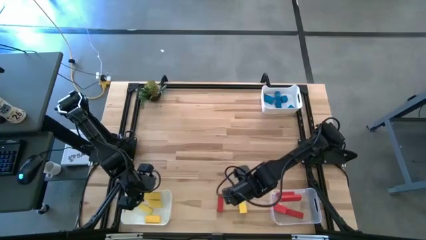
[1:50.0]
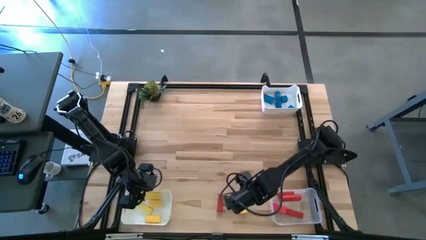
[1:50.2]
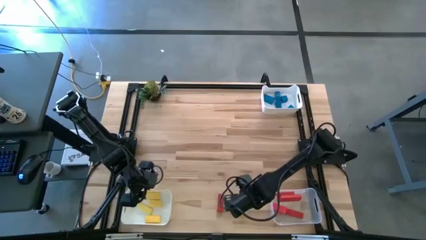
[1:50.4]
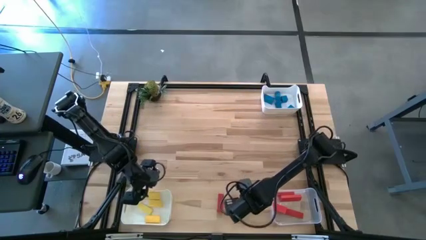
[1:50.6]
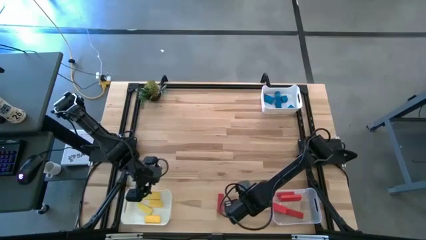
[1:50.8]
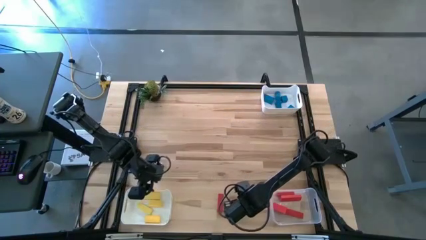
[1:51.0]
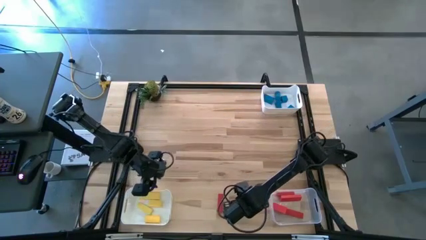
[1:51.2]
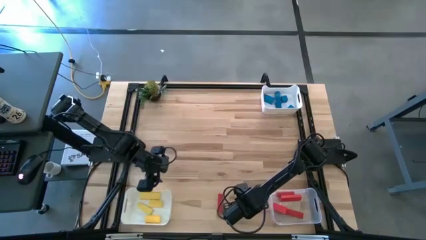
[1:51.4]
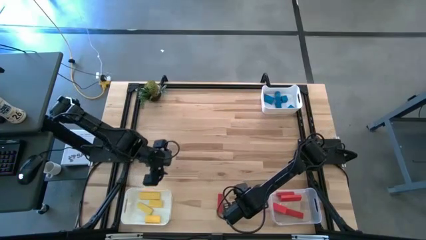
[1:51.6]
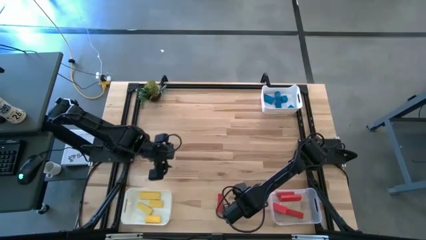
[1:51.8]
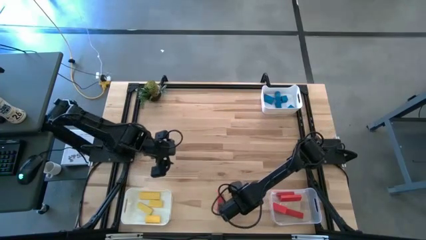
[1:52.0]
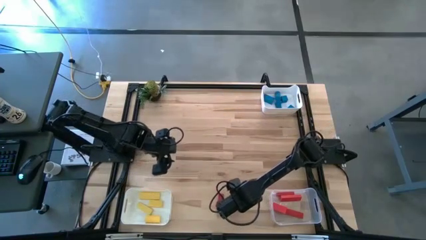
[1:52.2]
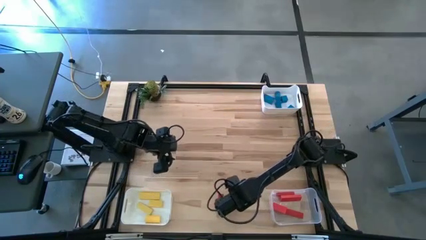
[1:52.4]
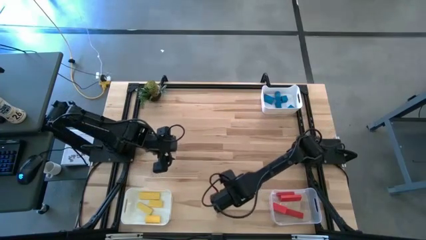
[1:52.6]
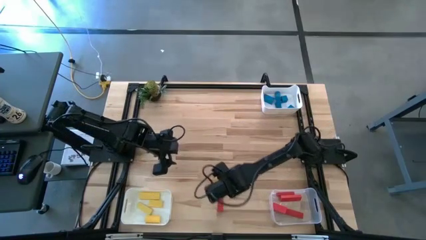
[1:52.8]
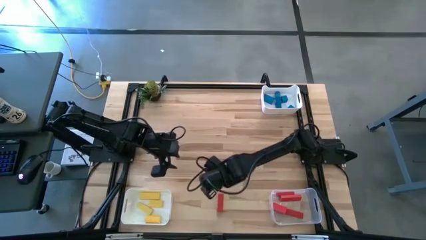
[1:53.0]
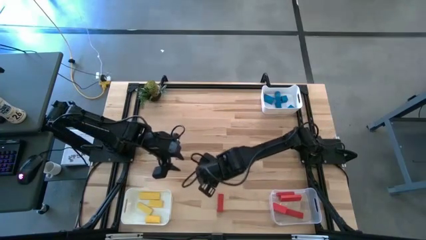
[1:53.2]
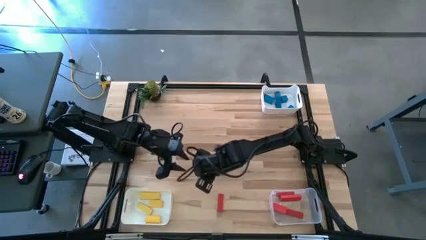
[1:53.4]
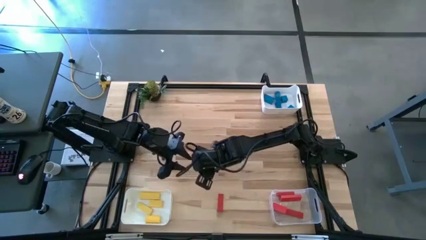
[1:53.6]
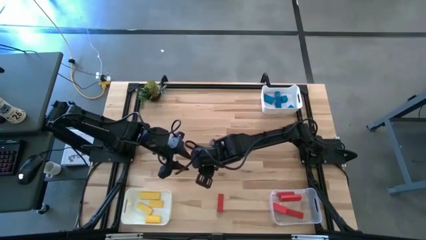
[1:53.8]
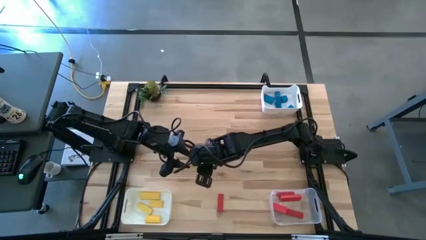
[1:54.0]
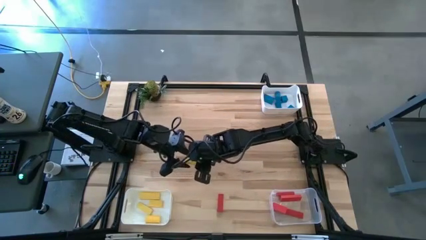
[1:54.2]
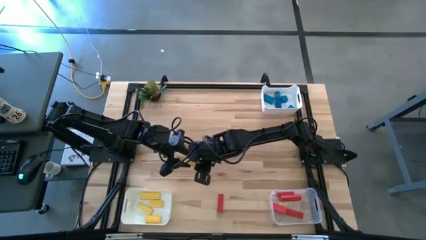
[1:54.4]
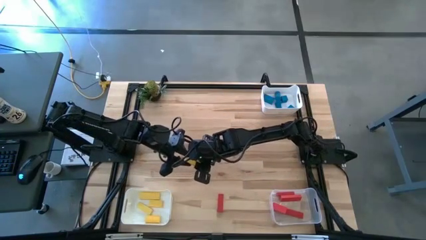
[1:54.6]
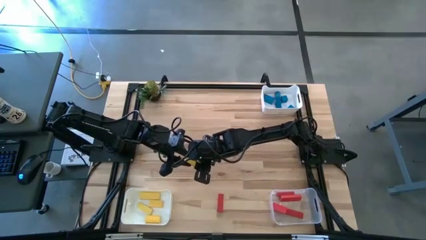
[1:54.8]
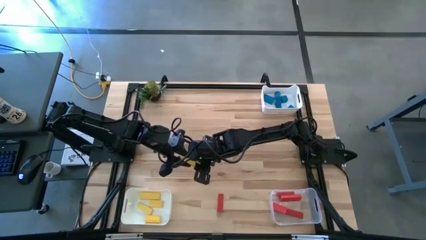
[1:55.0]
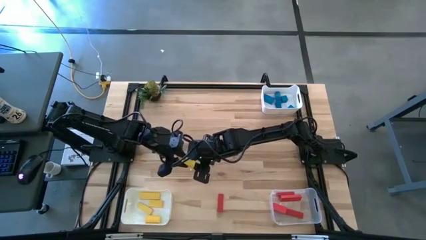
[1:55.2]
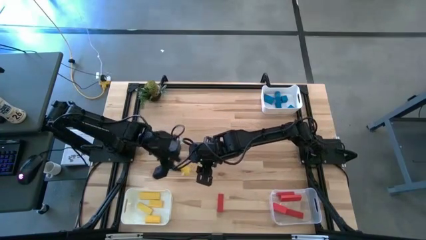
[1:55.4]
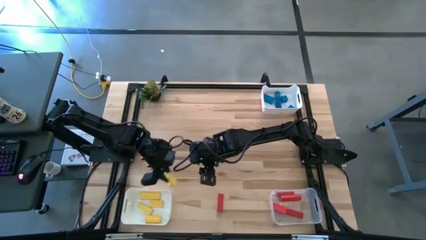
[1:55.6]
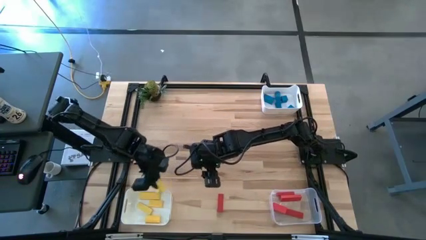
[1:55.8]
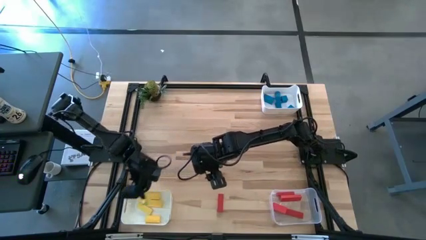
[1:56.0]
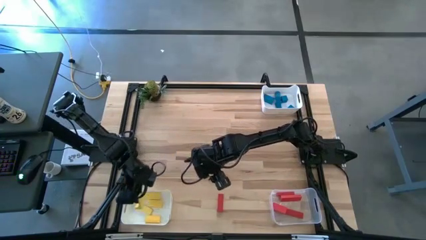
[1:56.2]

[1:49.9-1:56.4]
Task: Sort & place blocks by color
Put the yellow block into the bottom white bin

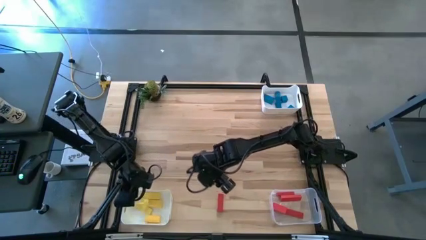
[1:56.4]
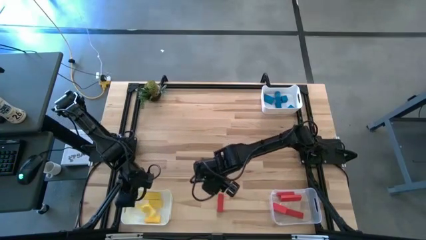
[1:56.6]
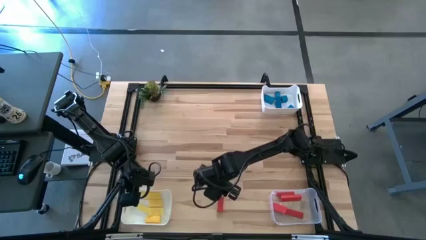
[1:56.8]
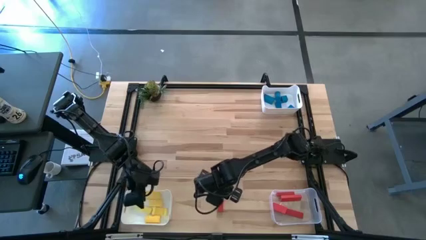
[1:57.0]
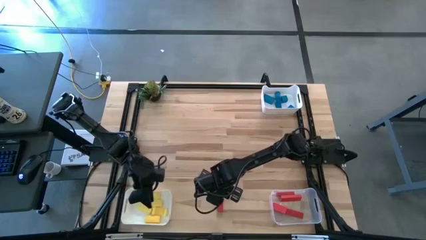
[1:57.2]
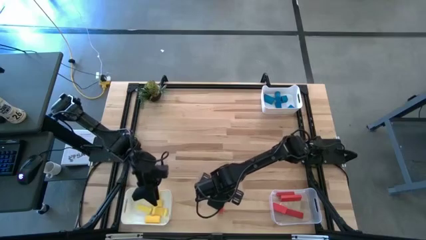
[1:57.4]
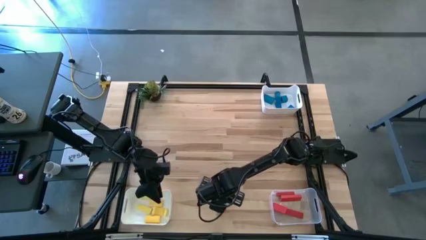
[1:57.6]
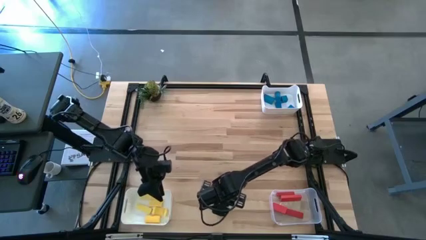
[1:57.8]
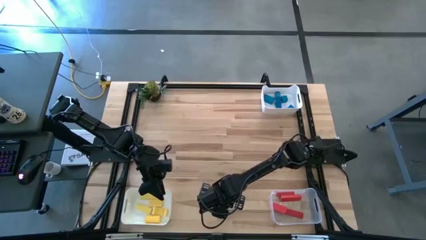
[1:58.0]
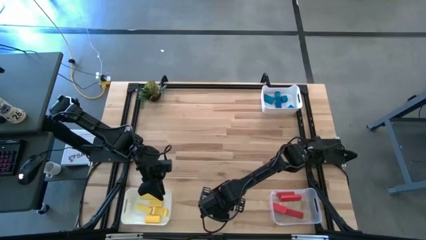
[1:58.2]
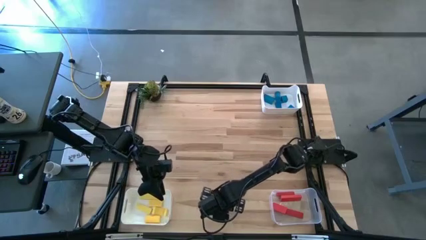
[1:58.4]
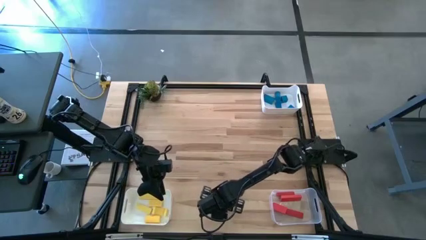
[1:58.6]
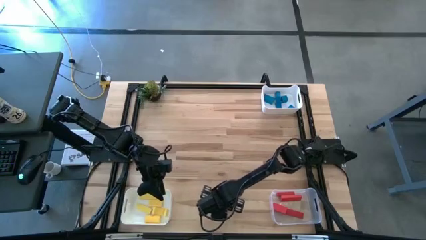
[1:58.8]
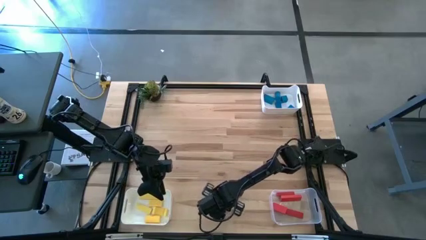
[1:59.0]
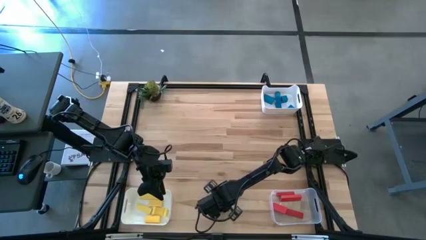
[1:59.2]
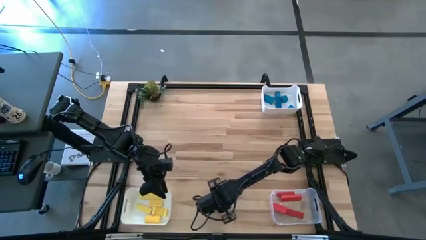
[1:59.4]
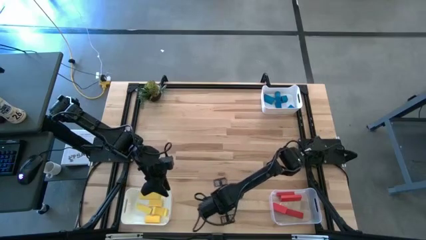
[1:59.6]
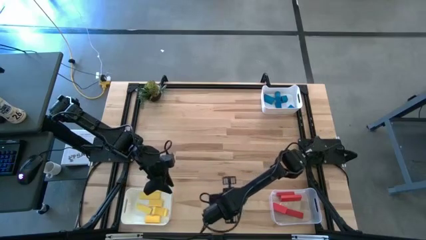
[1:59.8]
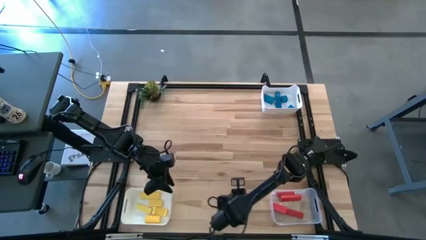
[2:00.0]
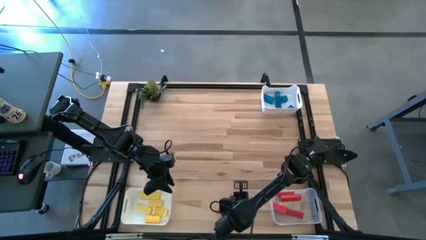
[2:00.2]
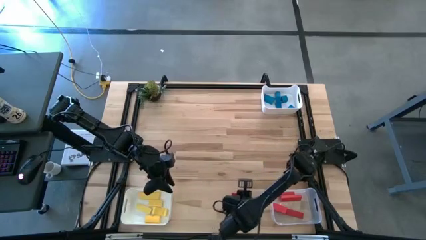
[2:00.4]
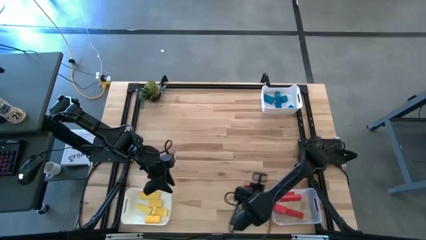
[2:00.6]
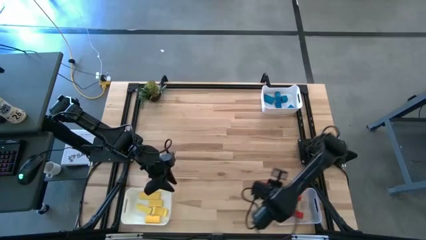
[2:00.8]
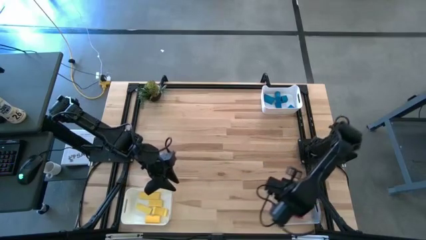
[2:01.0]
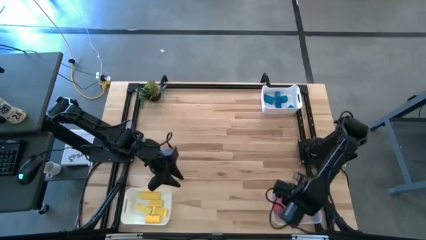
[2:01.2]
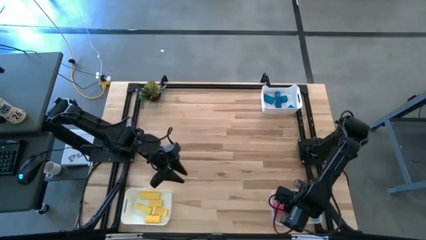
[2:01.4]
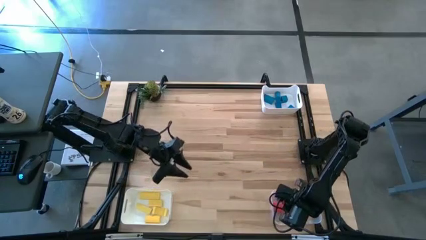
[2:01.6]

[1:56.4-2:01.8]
Put the red block into the transparent bin

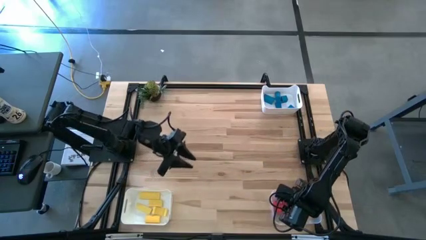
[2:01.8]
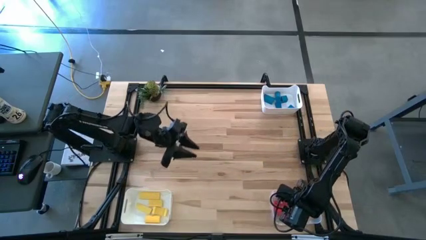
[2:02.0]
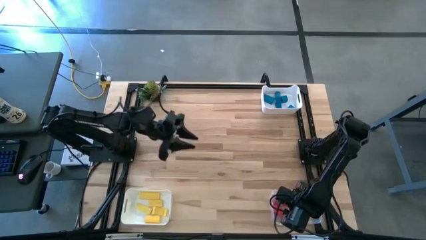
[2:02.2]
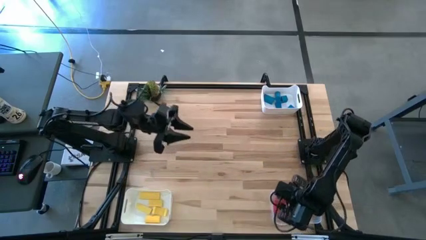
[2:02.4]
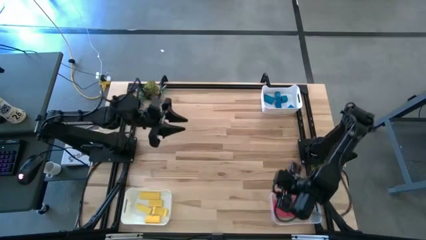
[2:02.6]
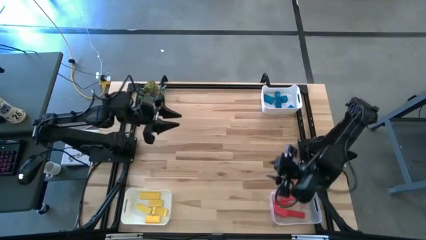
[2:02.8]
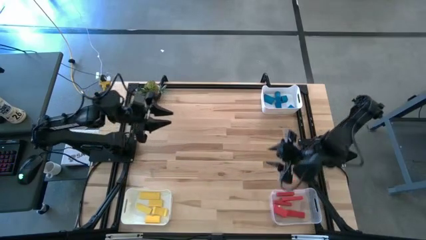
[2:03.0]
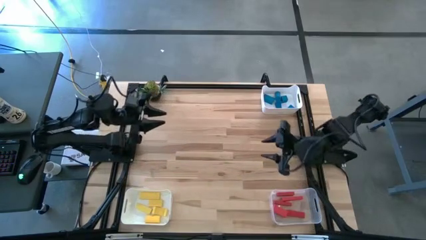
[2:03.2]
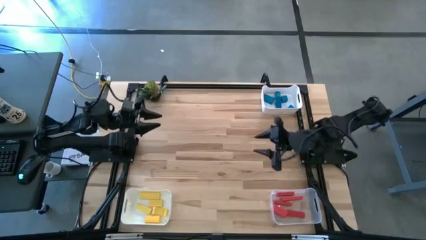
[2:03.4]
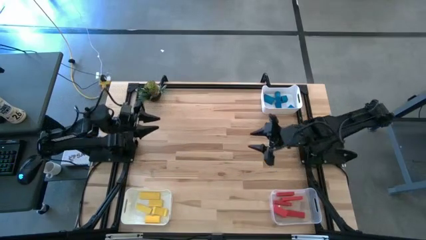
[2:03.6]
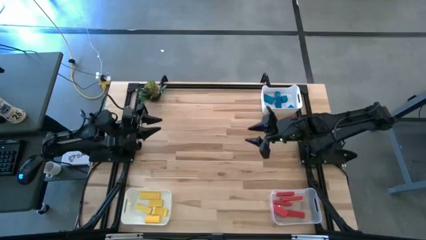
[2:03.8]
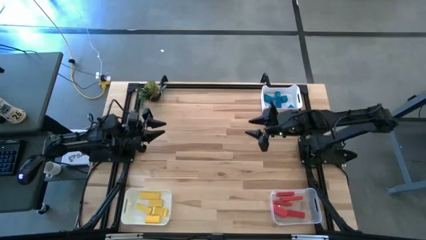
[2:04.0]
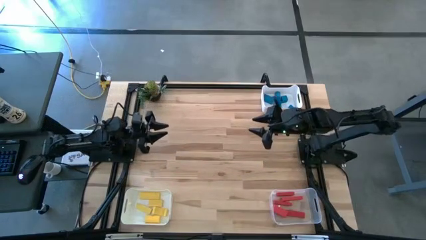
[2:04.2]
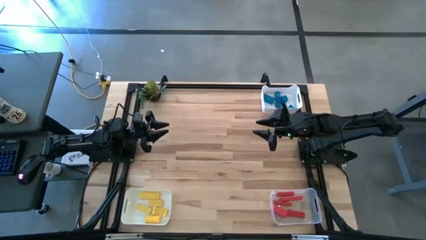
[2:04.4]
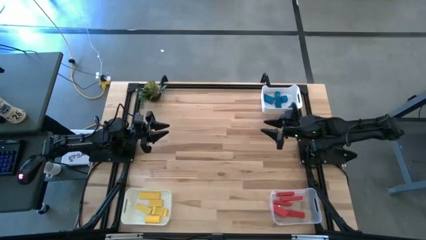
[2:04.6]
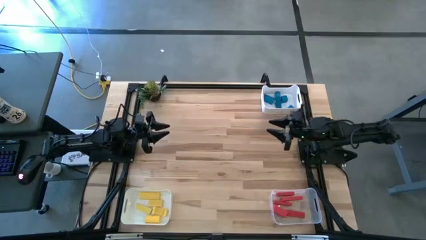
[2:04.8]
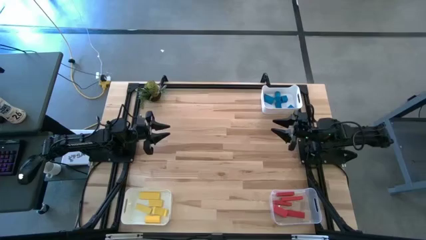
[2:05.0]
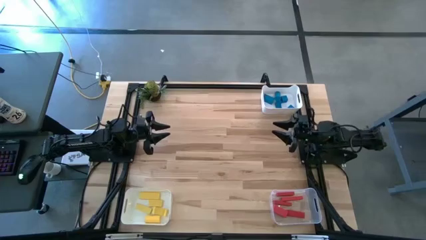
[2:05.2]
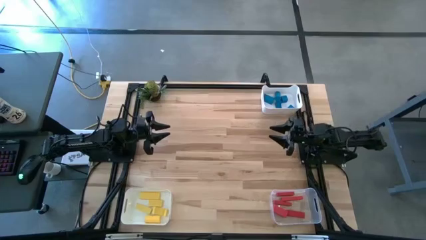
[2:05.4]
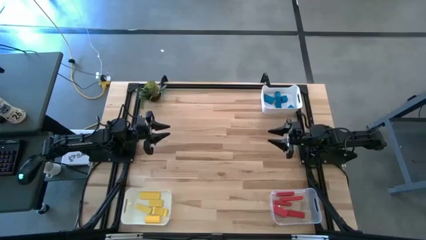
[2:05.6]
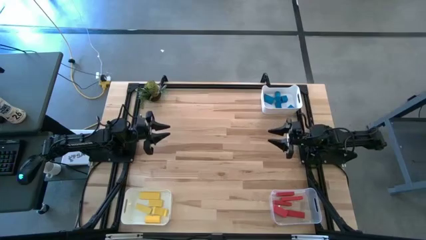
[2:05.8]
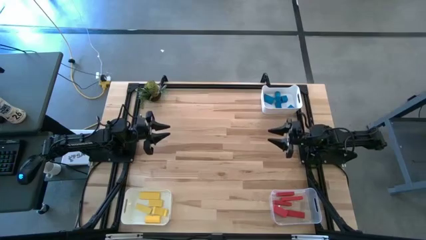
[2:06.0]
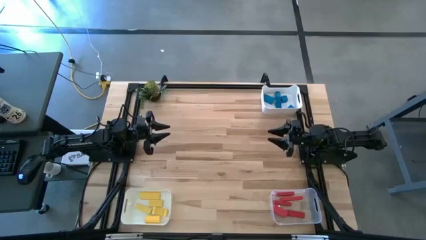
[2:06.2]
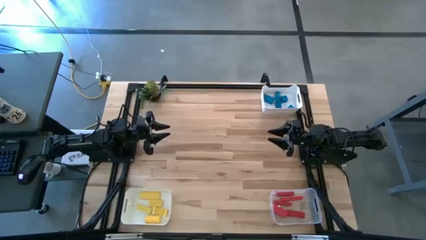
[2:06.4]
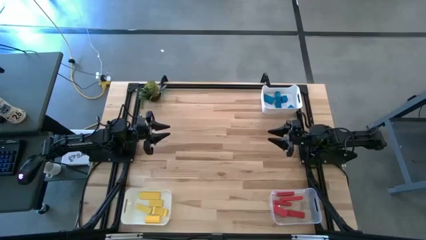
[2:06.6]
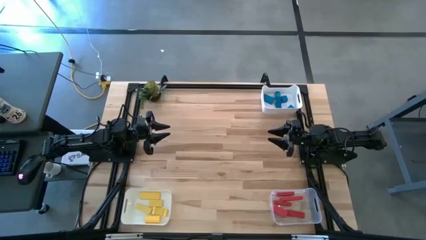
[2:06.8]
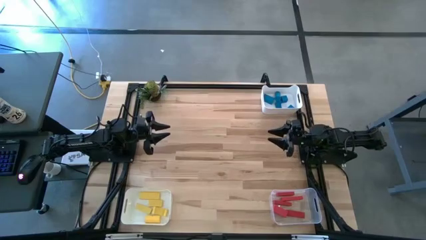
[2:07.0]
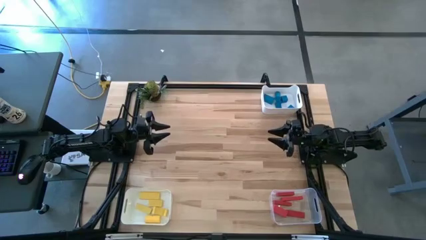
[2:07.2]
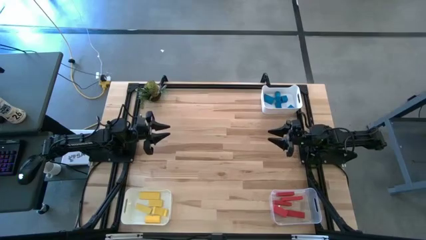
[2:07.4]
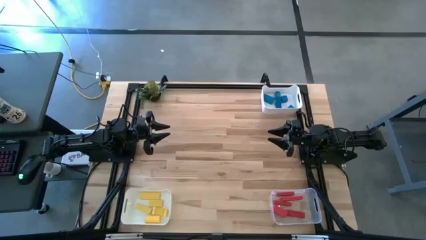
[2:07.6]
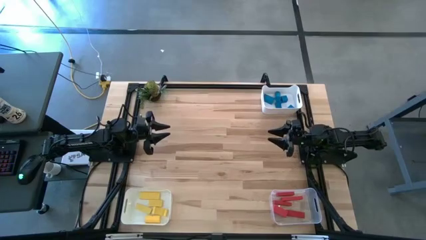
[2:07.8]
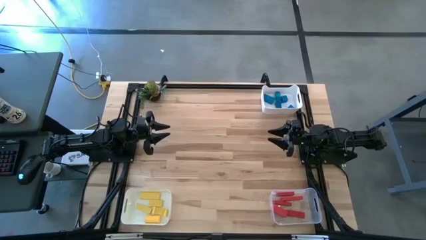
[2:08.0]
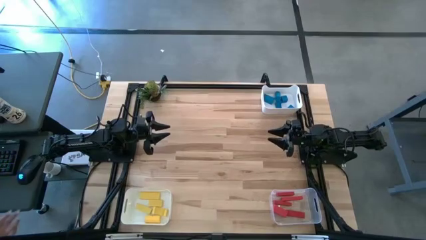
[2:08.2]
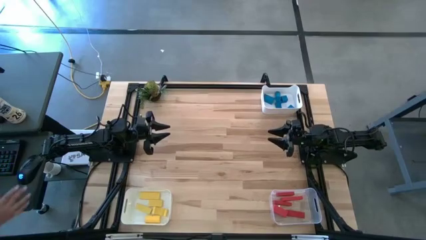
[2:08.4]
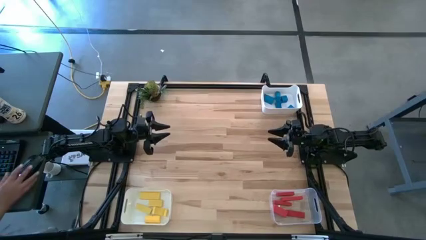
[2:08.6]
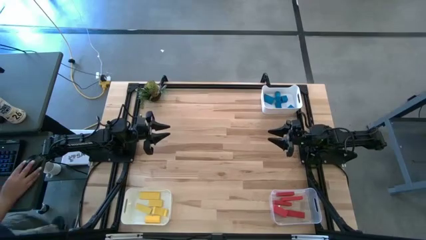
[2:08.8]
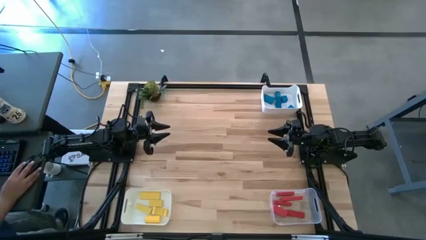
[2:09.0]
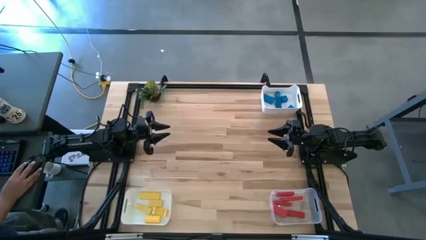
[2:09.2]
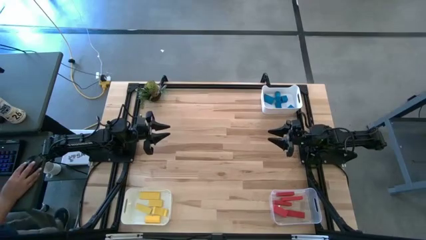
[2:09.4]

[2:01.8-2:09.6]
Return to Home Position
